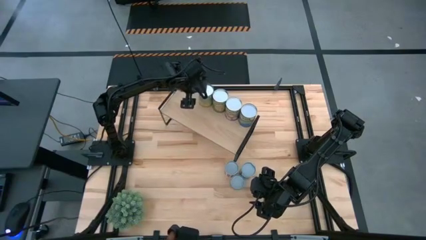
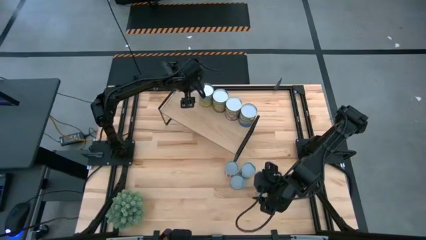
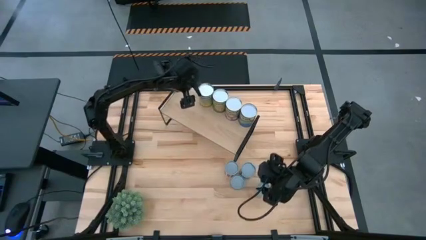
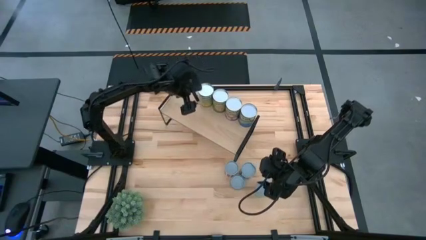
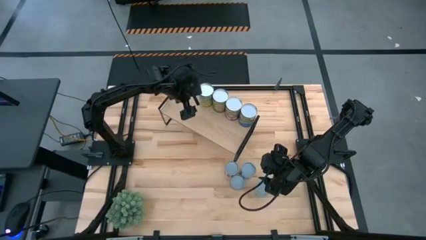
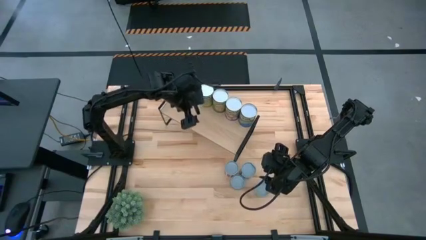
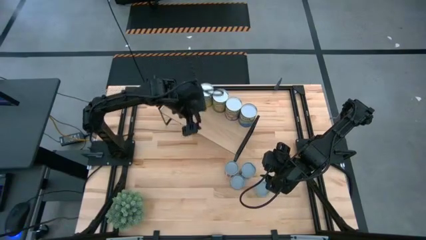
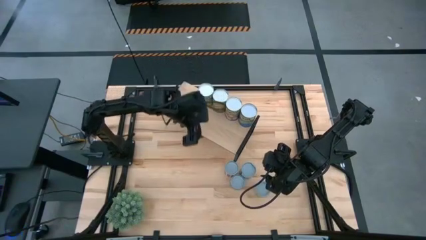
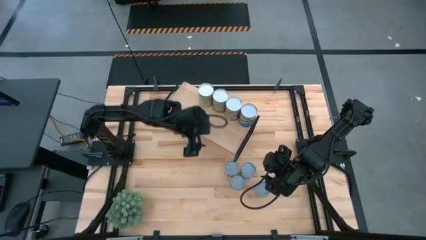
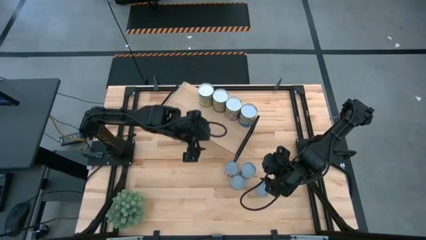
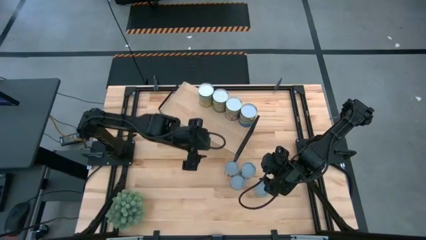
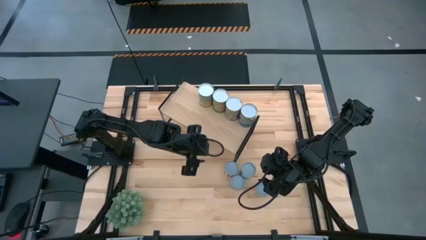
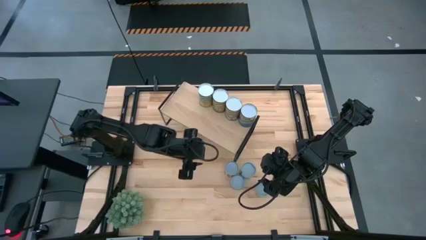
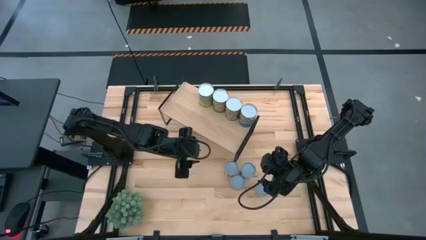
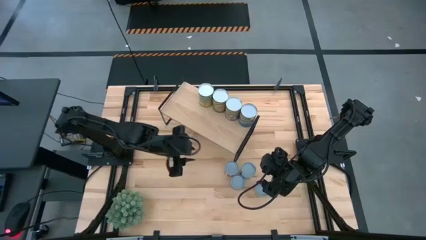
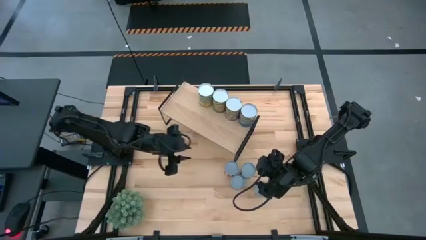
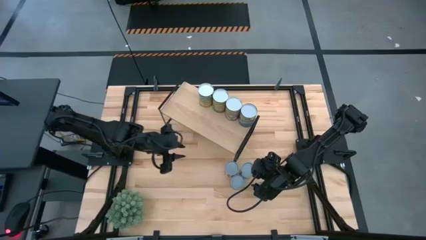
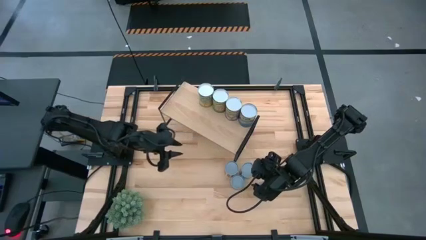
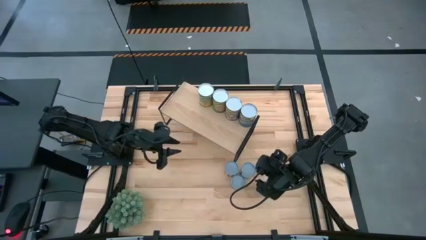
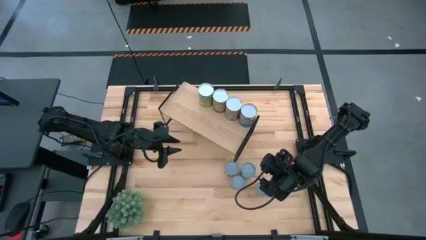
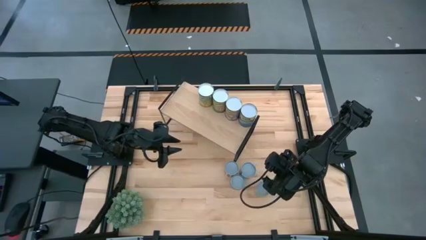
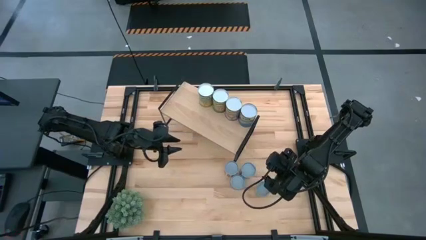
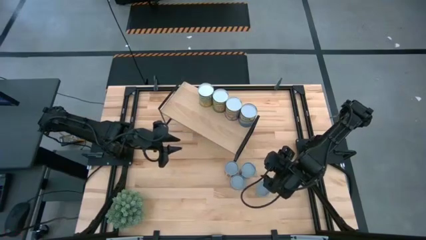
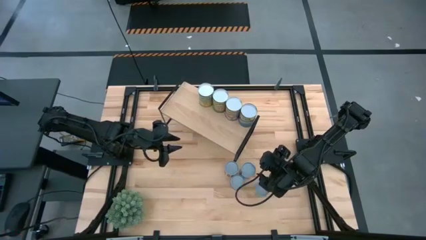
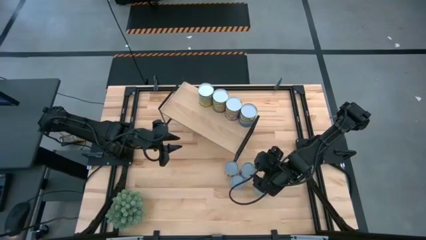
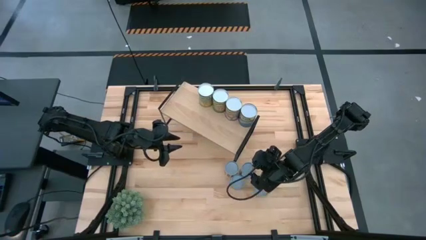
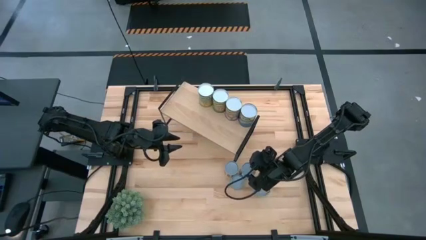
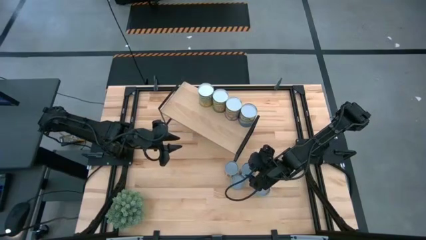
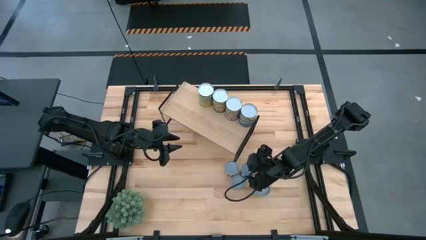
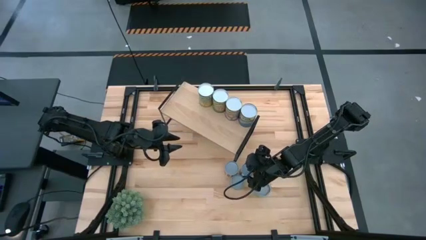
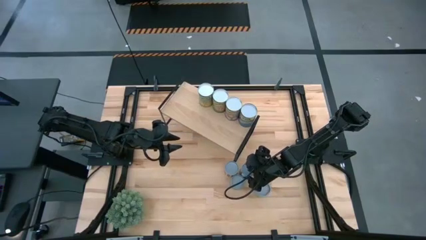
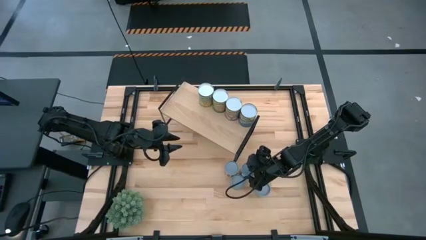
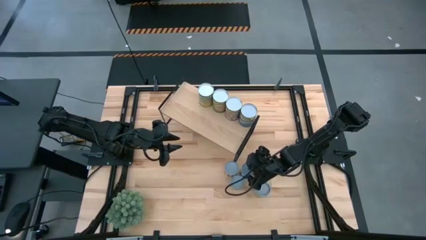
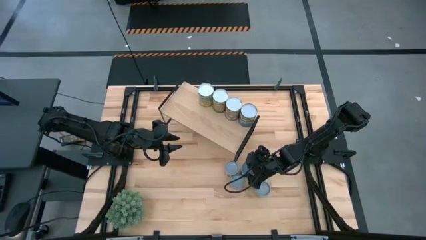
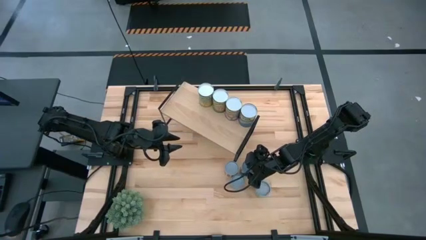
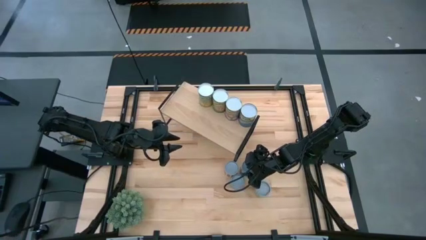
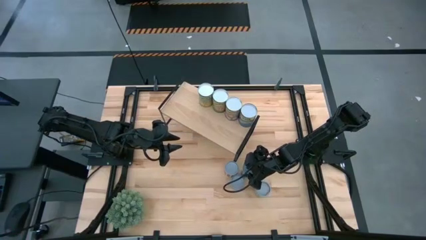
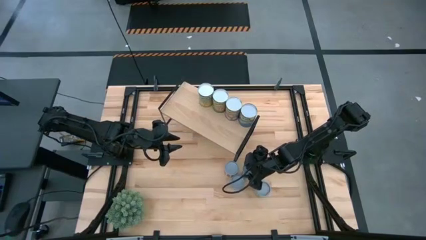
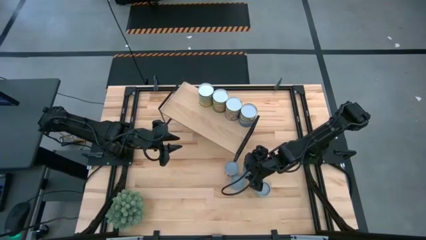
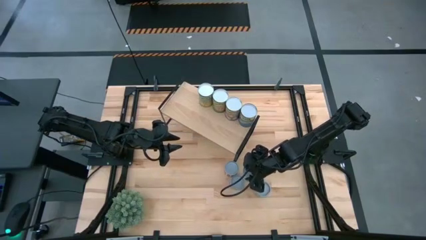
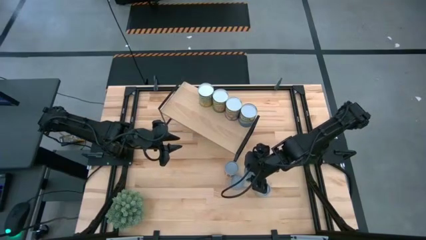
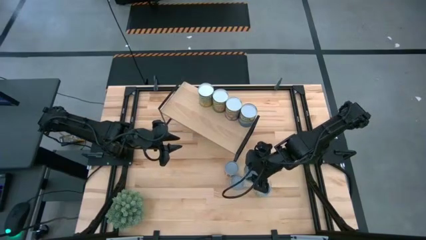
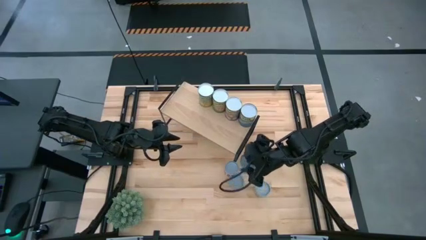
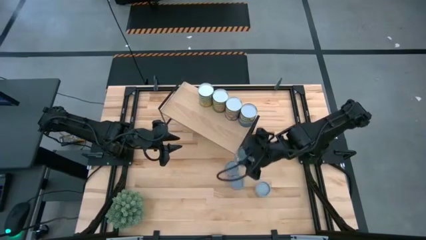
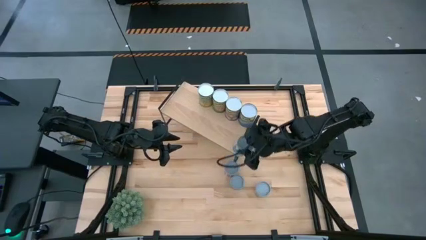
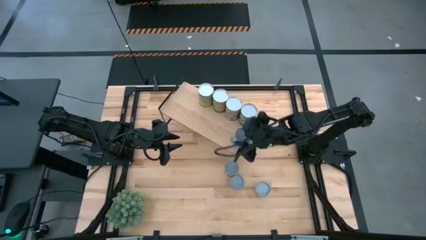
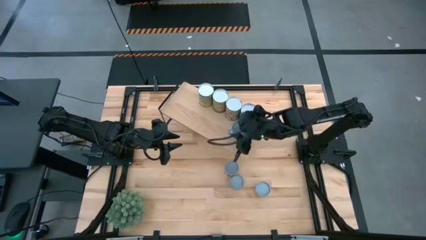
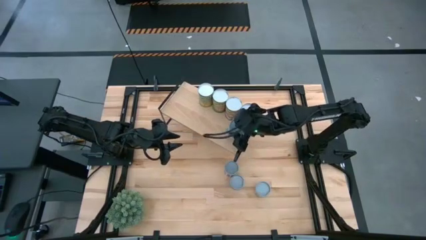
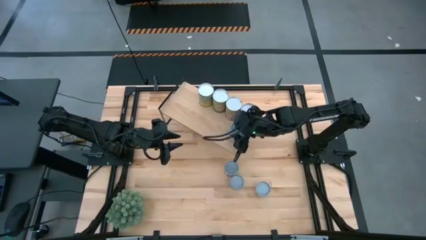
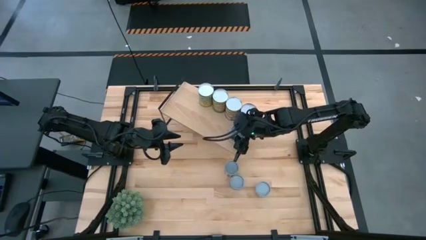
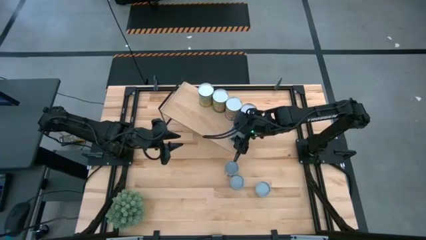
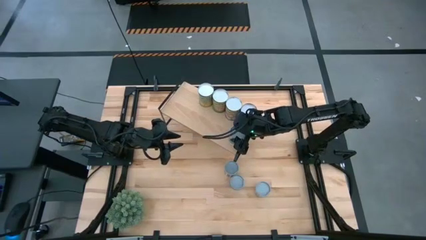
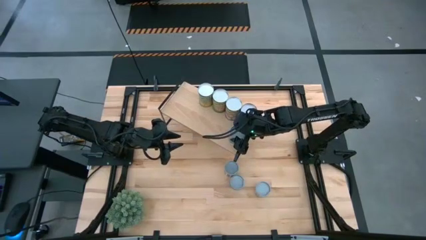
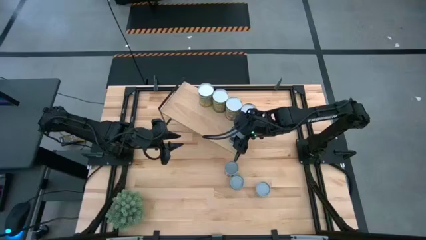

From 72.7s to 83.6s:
Task: Pick and place cans onto a shelf
Put the canned mixed vegetables on the shelf

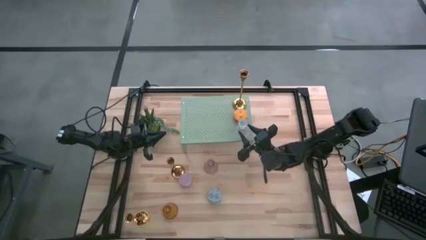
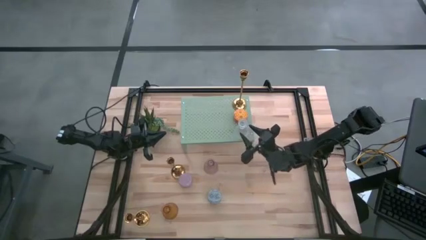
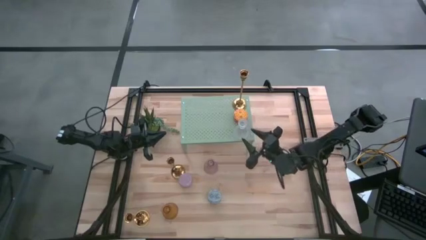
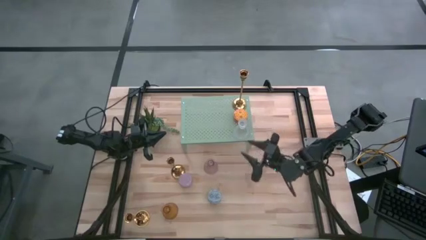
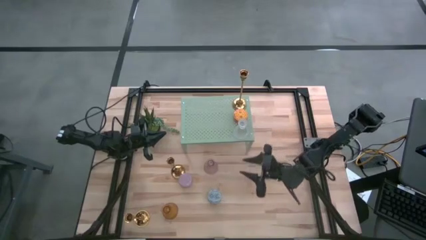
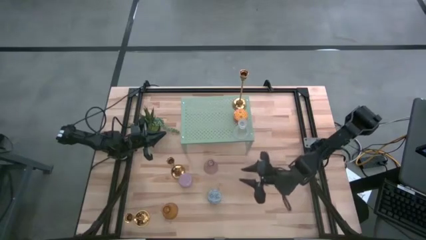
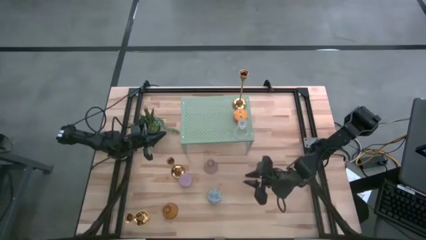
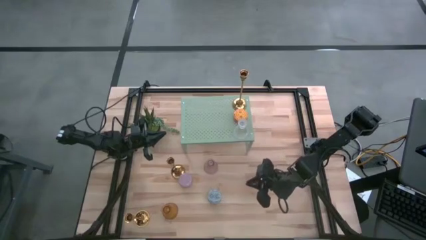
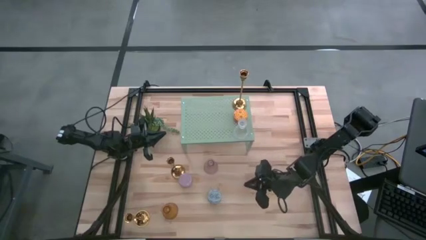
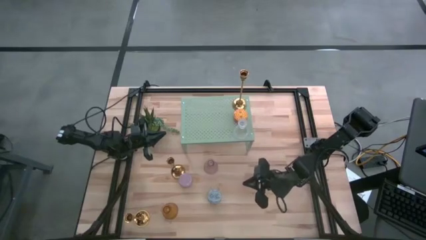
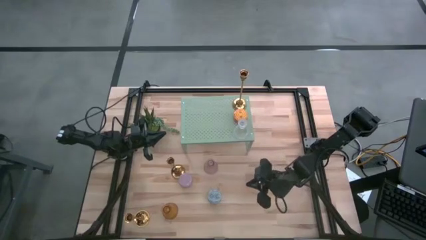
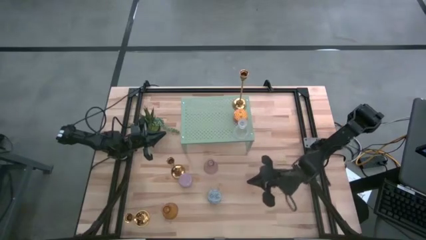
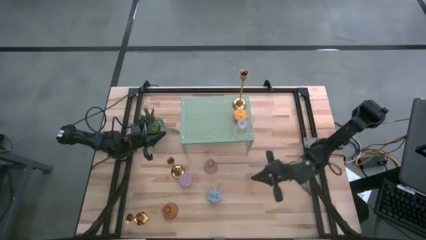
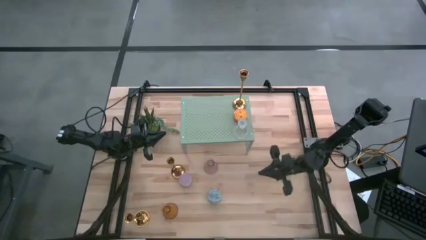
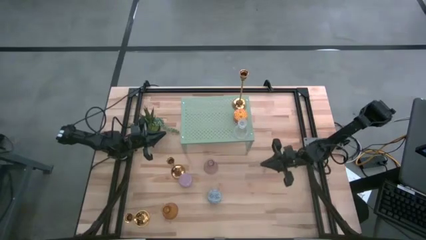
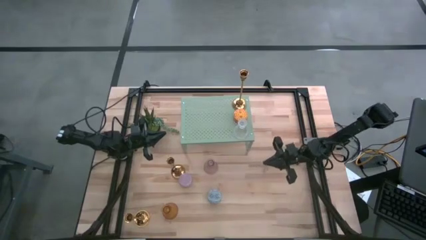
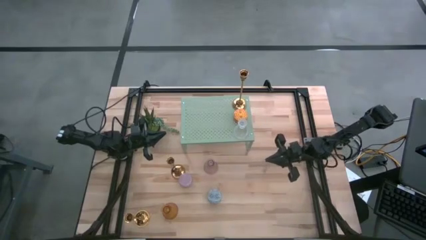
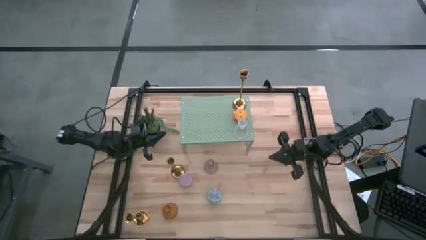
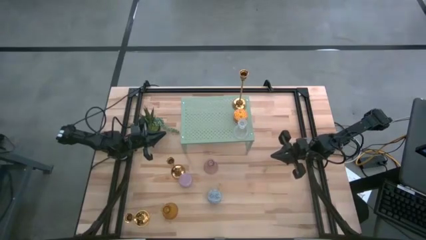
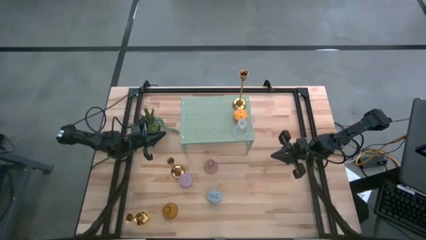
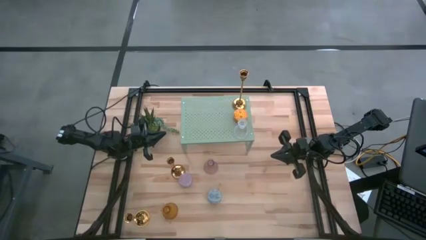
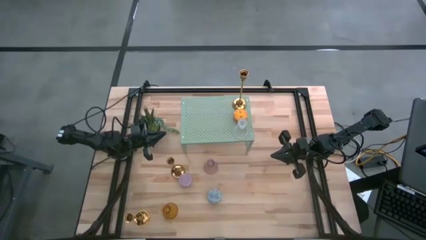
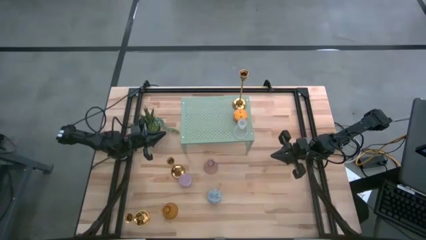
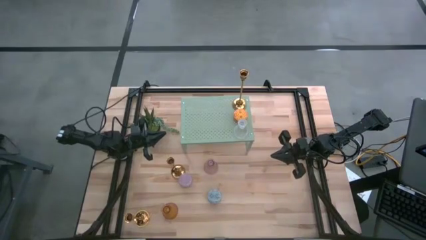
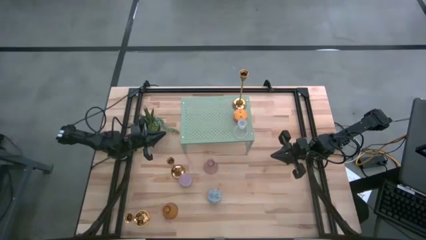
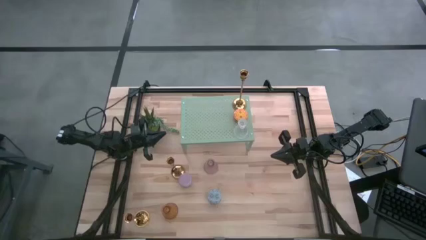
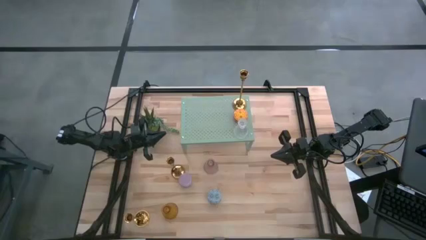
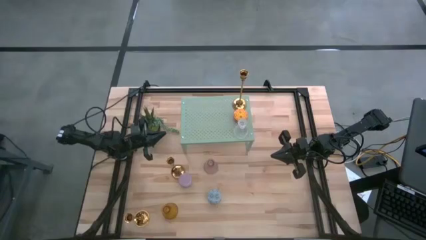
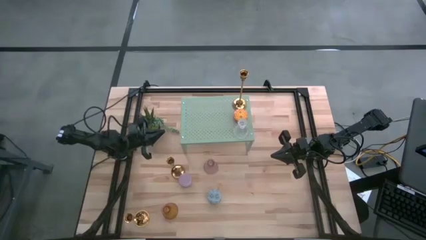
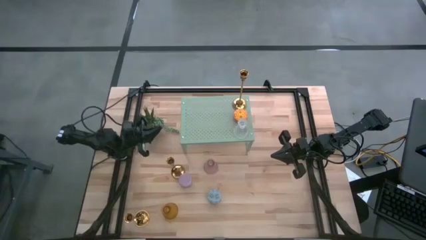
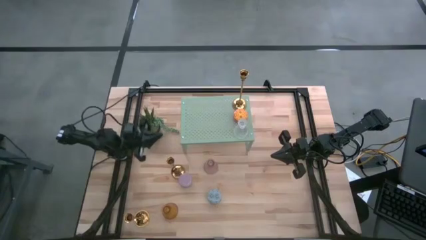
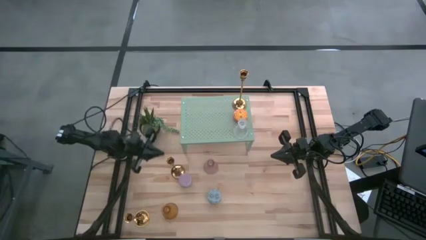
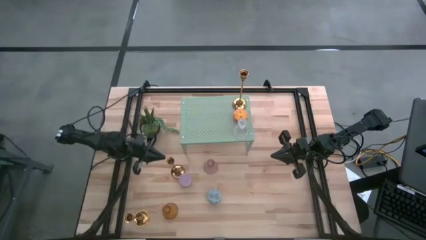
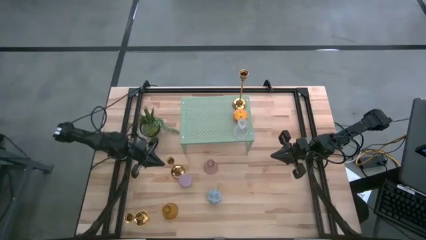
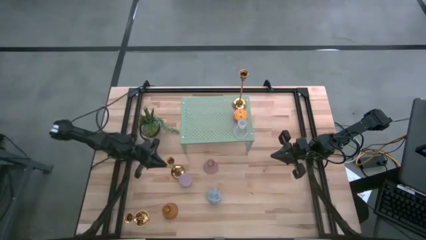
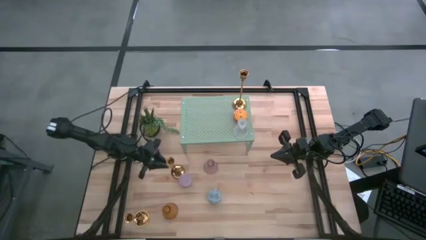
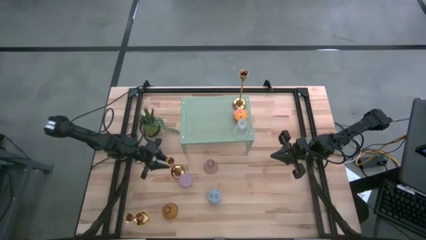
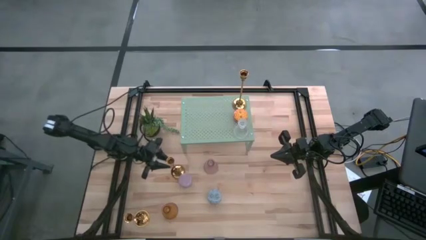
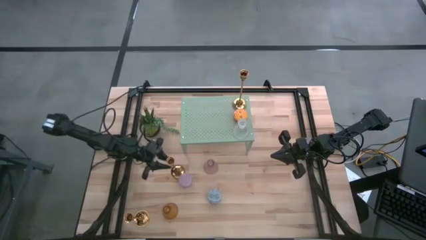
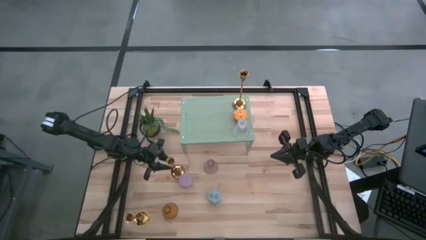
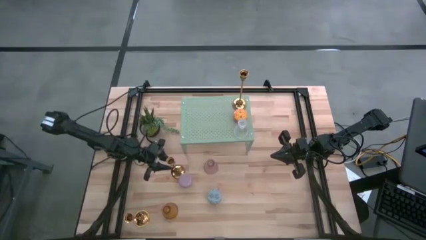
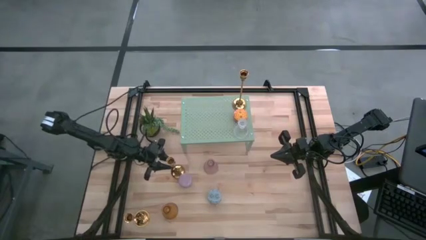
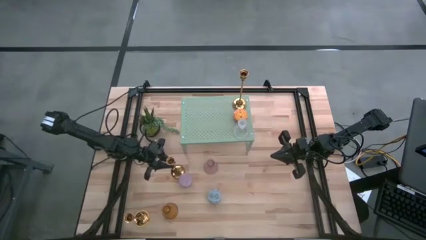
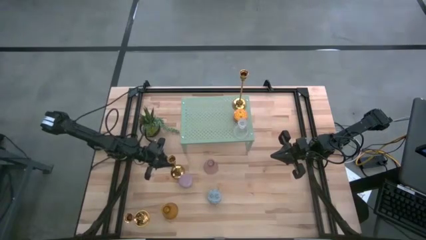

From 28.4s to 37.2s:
Task: Pick & Place candle stick holders
Put the top gold candle holder on the shelf
